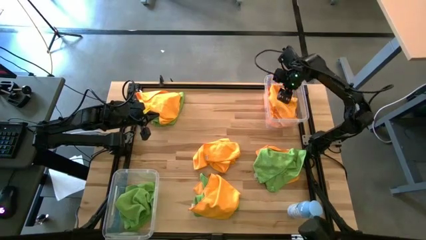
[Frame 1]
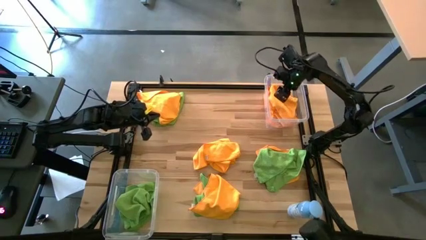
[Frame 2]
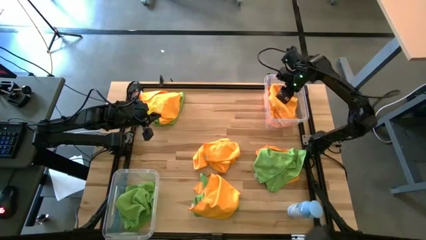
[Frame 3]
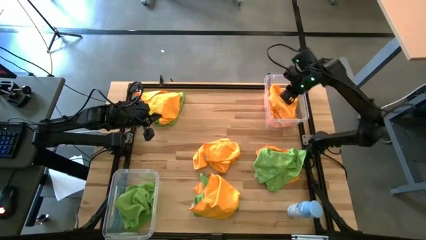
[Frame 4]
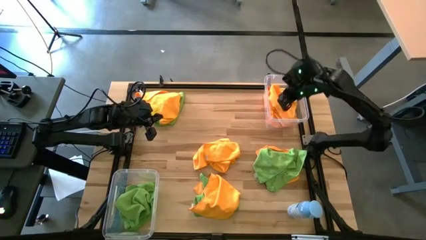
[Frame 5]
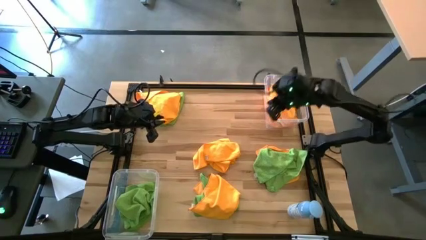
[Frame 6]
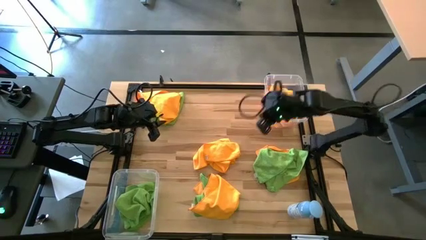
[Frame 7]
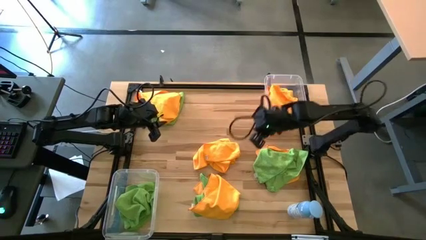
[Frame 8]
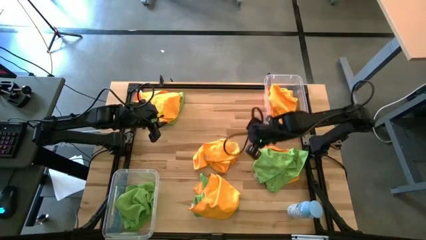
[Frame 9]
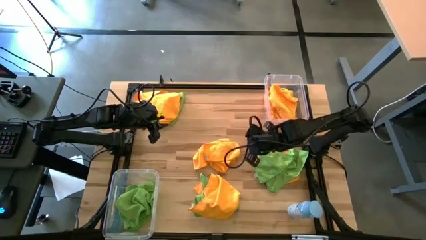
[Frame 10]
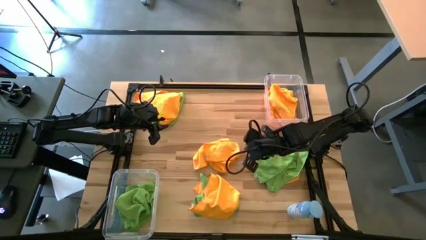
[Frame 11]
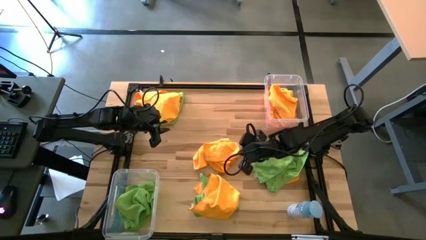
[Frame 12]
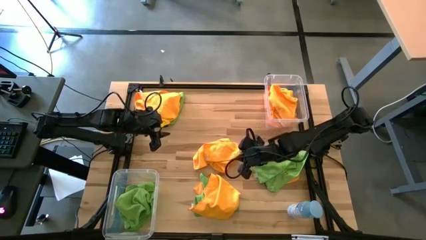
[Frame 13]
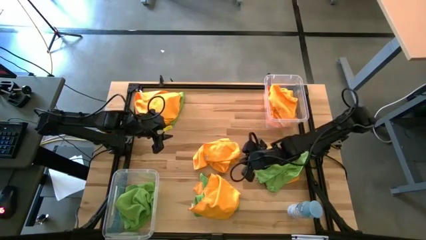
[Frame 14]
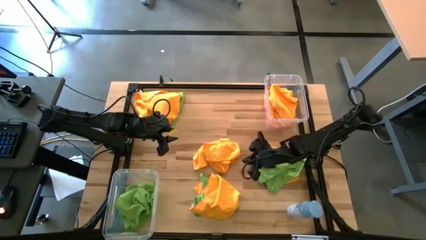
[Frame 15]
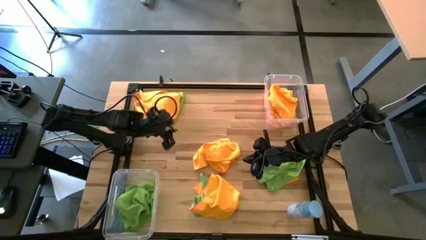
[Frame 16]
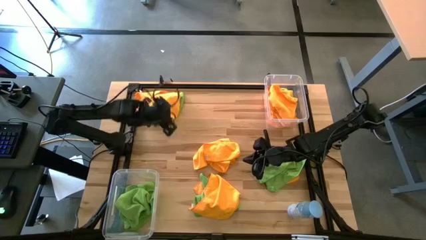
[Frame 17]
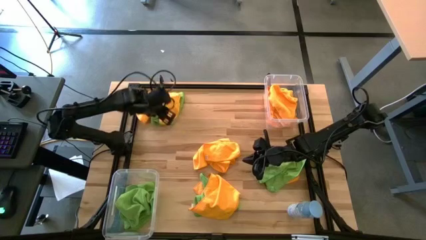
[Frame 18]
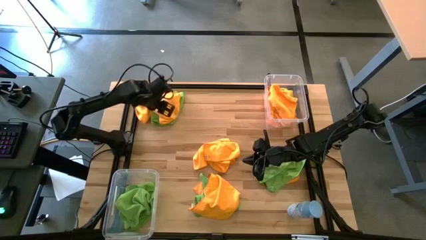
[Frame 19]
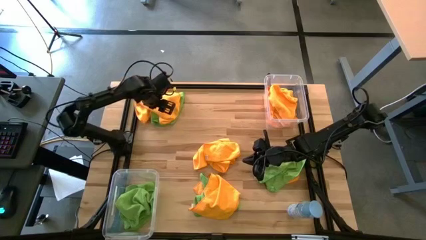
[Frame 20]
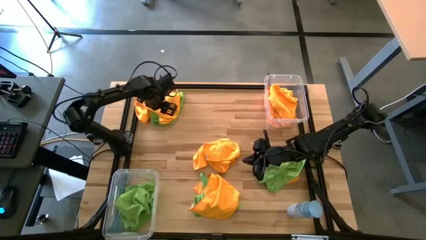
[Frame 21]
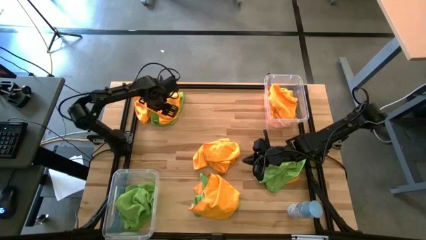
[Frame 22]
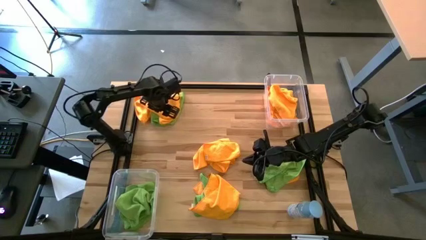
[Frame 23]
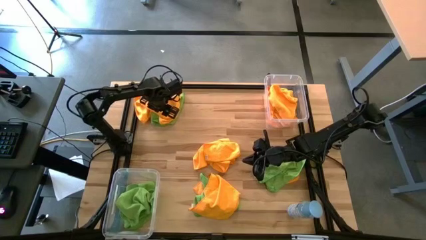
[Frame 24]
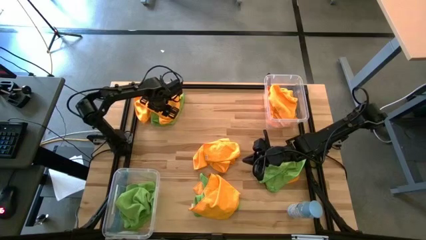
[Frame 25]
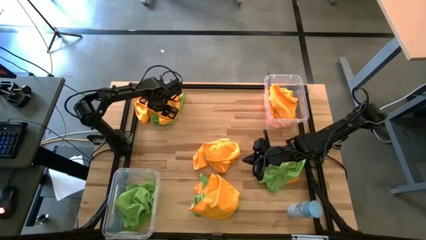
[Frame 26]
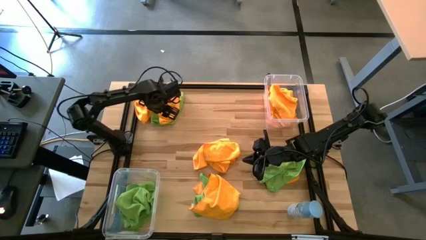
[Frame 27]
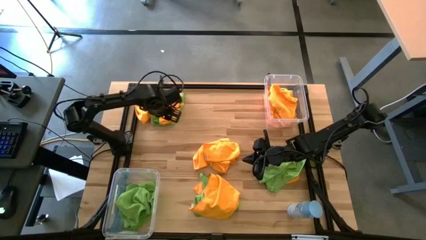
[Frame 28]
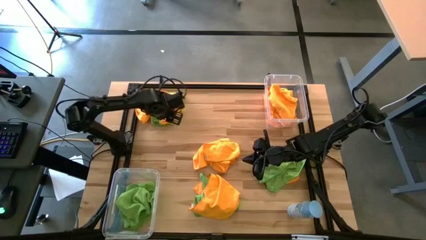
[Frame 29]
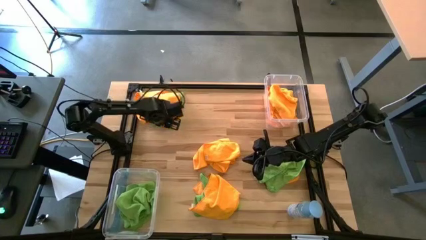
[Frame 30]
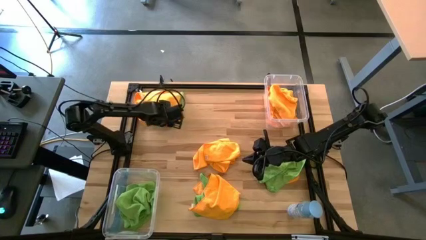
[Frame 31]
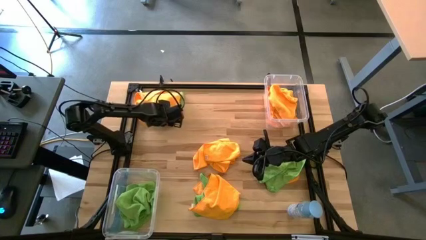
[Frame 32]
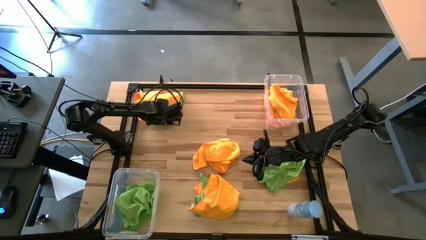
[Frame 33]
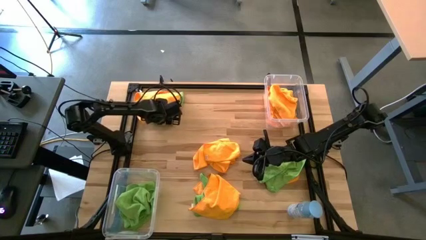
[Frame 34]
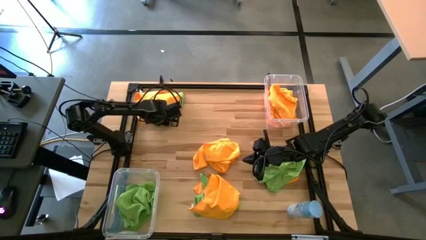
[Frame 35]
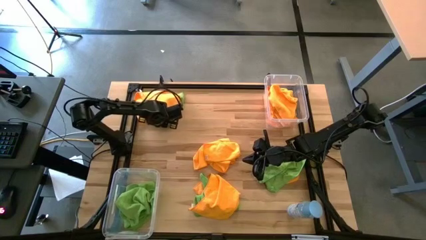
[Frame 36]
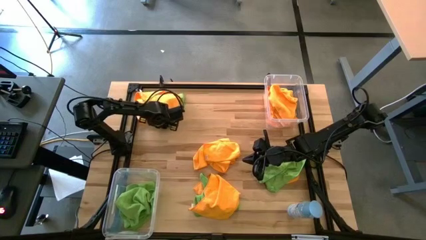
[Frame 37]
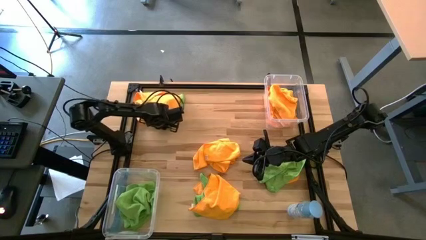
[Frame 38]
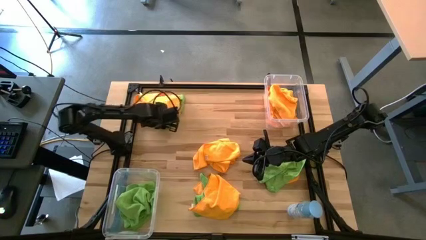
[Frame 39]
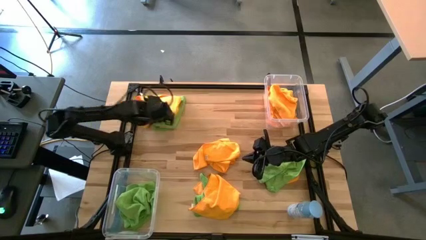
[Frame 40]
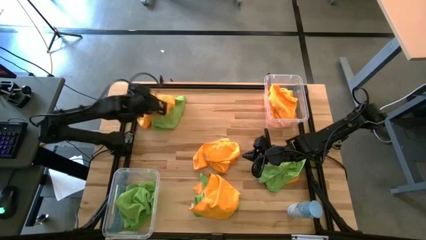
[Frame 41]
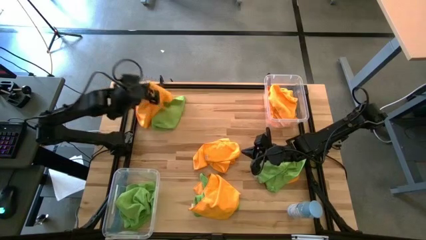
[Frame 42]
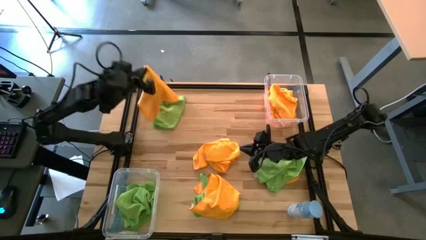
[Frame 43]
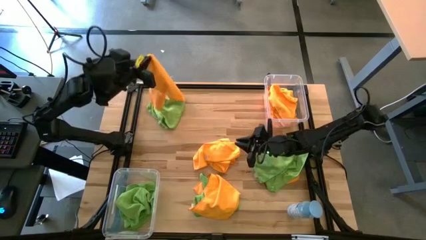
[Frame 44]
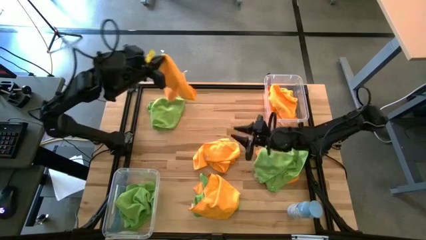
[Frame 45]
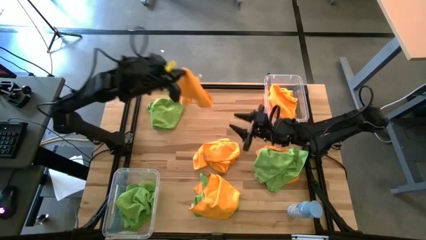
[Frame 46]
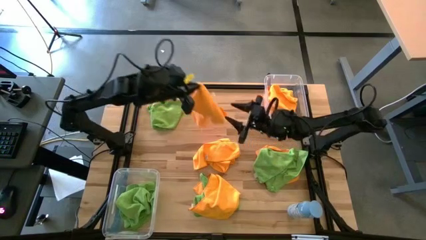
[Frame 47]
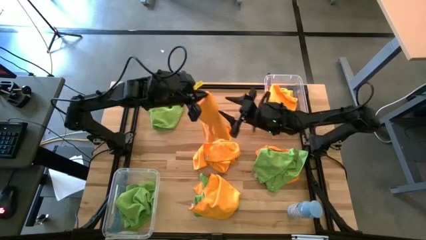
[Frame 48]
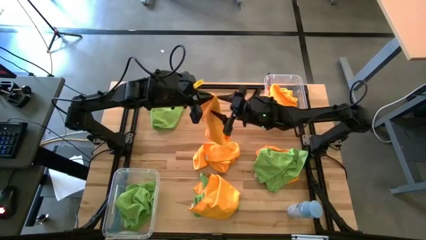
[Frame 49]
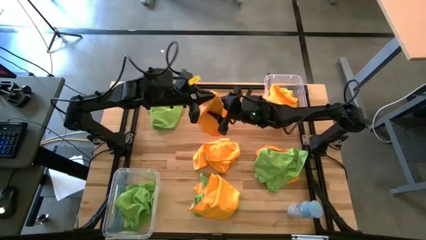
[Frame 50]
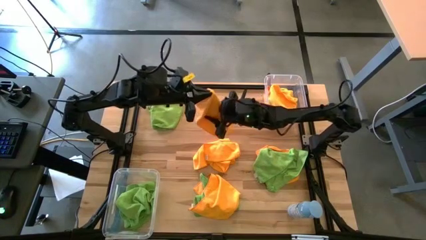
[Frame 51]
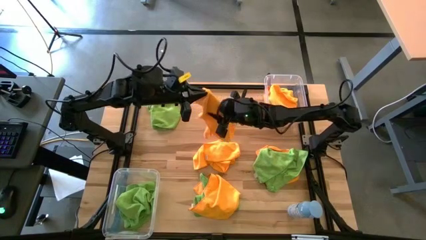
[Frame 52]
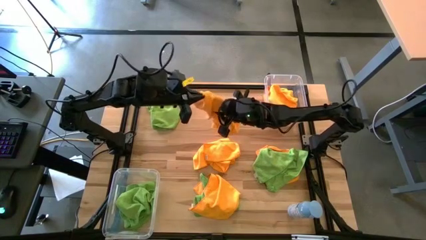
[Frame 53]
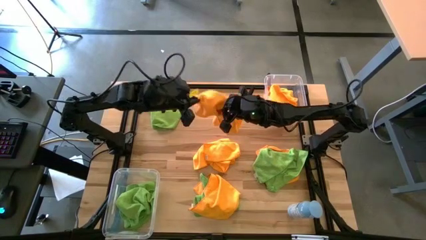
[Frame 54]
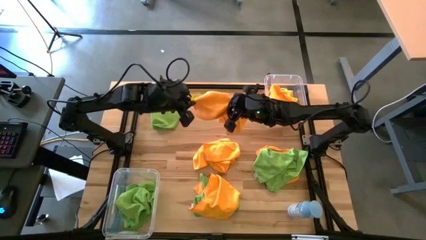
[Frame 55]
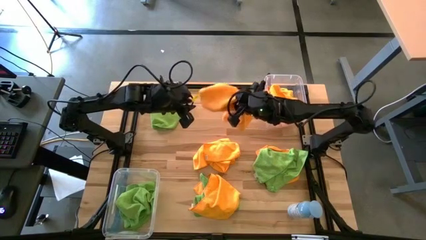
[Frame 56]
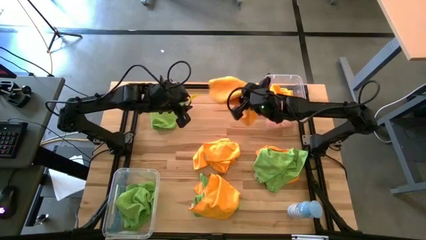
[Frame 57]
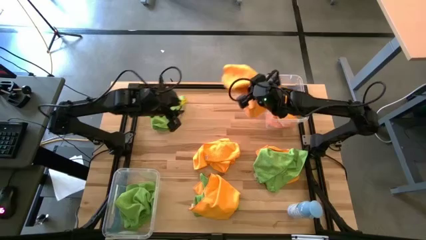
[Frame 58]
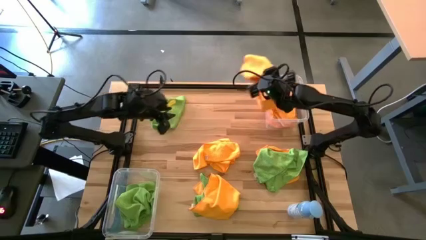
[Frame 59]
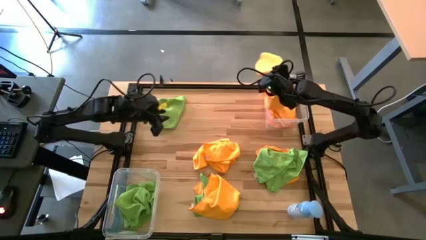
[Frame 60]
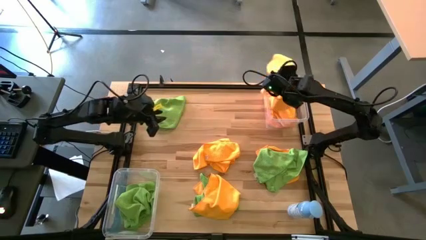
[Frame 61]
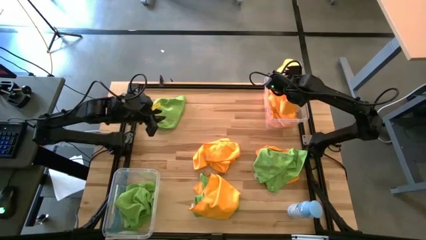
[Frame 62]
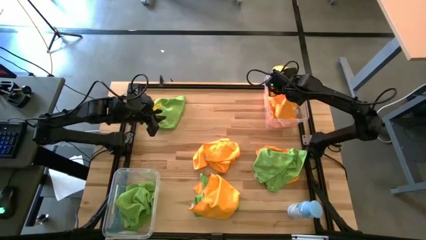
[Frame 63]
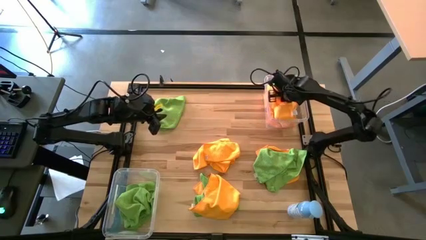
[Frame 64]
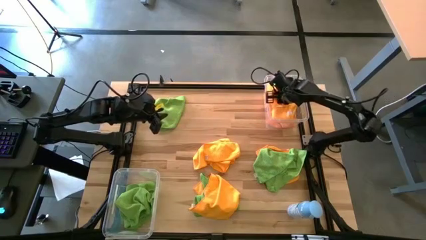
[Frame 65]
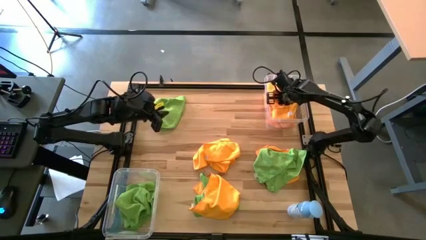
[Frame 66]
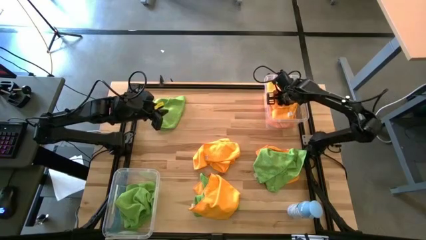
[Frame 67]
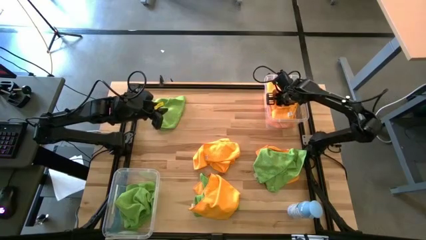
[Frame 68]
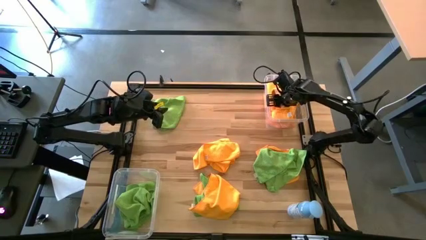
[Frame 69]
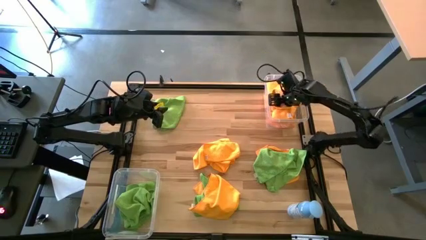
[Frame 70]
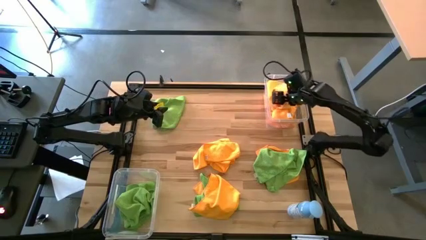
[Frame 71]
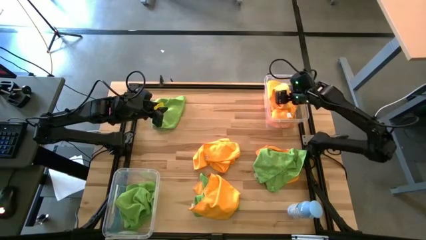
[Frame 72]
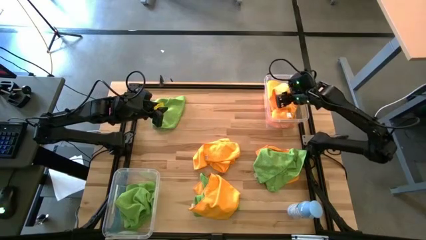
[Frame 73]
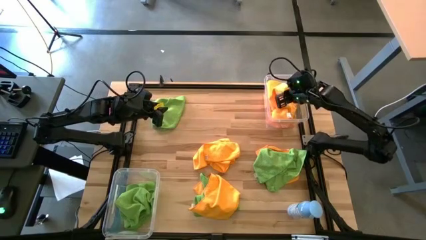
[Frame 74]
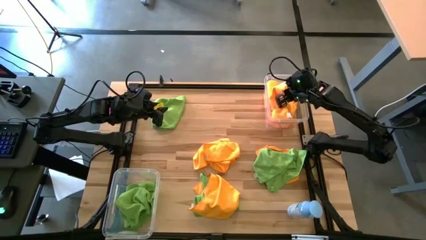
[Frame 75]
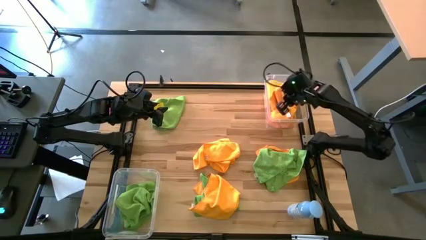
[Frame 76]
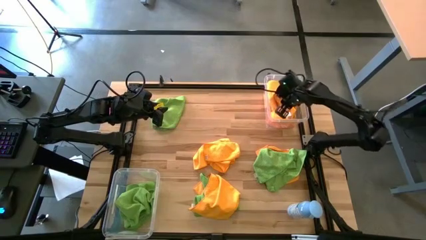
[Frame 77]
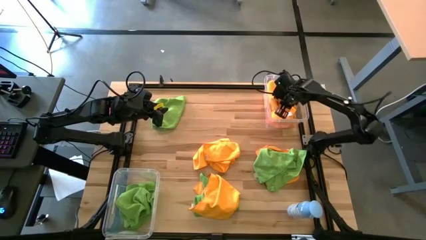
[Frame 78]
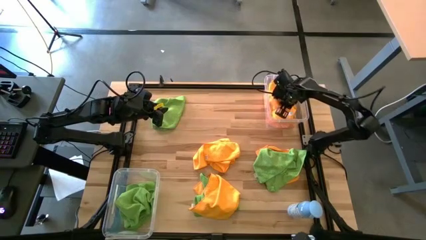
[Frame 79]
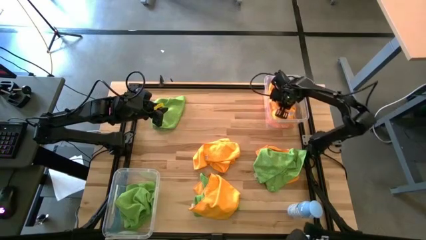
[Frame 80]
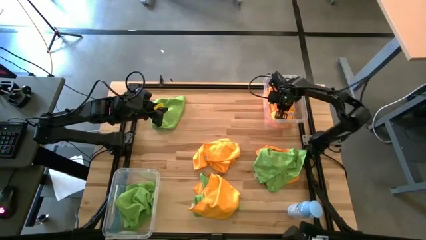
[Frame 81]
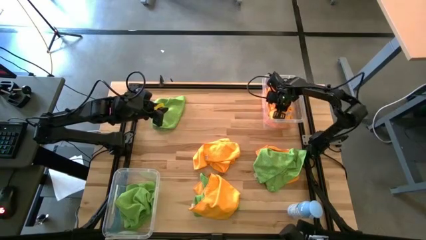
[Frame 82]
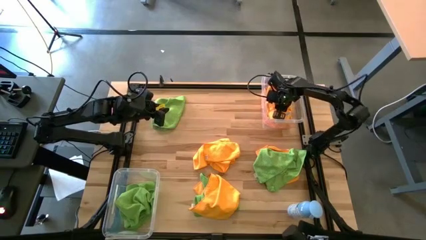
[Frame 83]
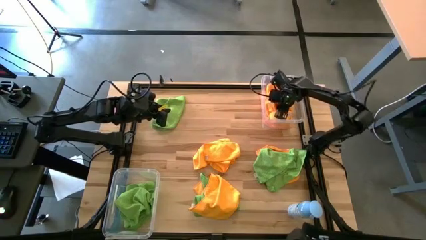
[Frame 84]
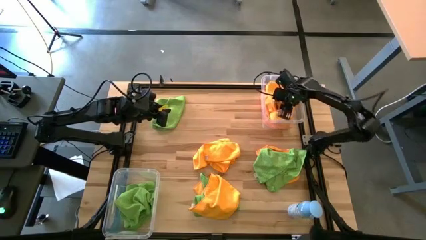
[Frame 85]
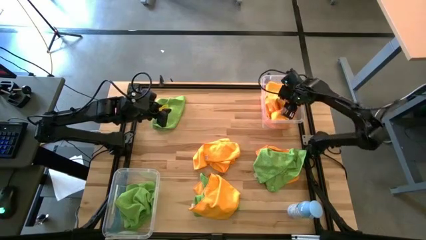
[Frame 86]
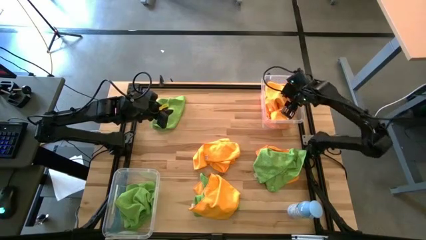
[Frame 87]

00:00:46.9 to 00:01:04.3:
Task: Sort microfiber towel by color & place in baskets
Put the orange microfiber towel into the top transparent bin
